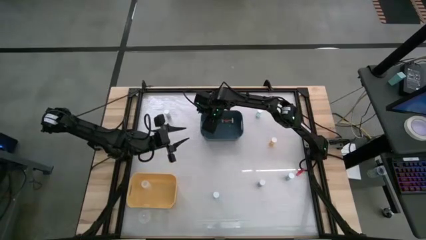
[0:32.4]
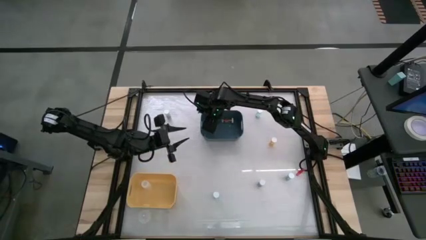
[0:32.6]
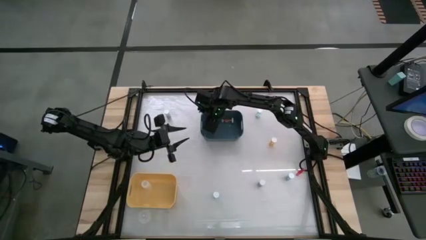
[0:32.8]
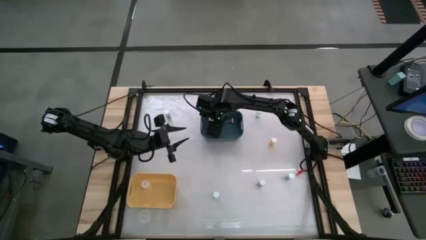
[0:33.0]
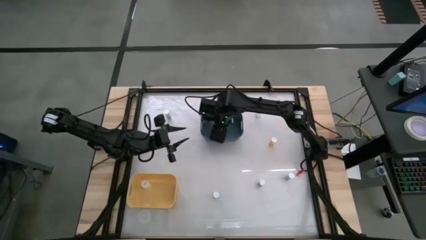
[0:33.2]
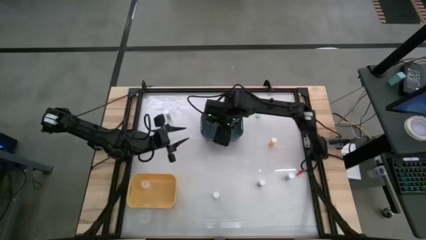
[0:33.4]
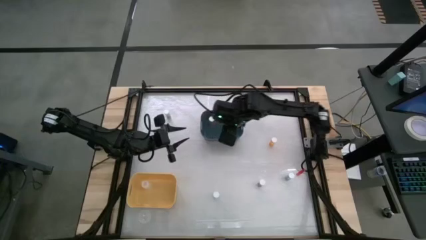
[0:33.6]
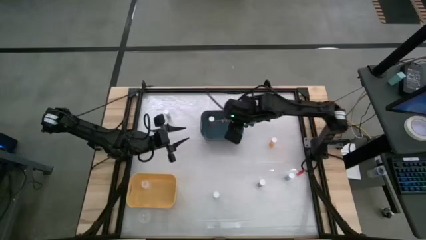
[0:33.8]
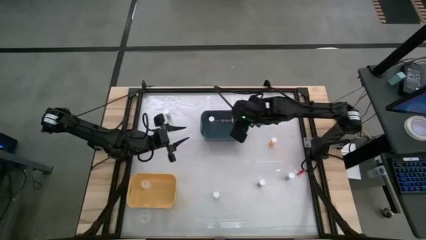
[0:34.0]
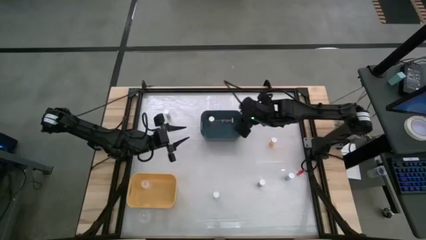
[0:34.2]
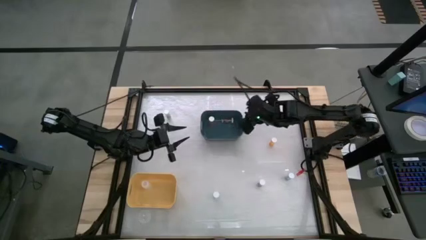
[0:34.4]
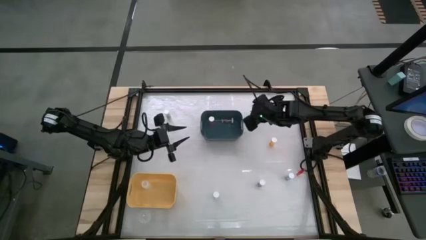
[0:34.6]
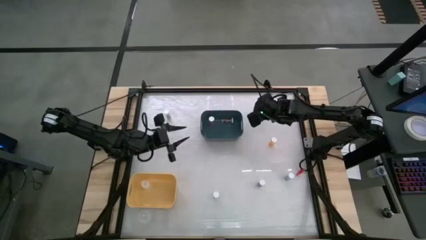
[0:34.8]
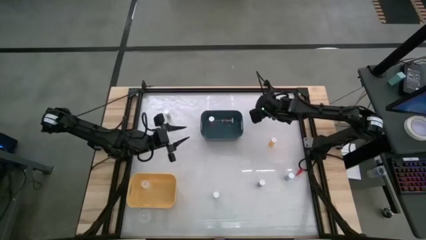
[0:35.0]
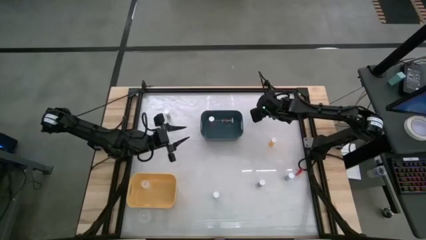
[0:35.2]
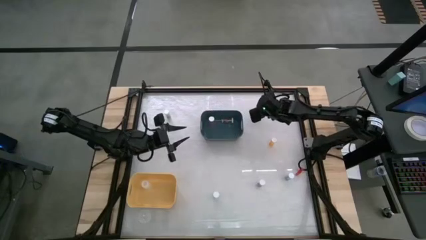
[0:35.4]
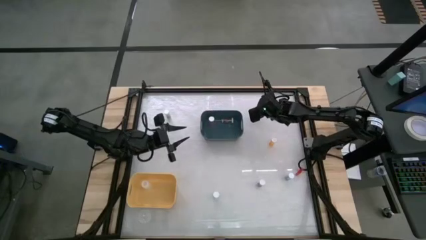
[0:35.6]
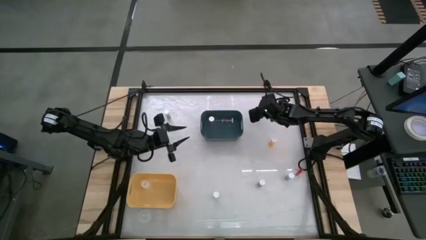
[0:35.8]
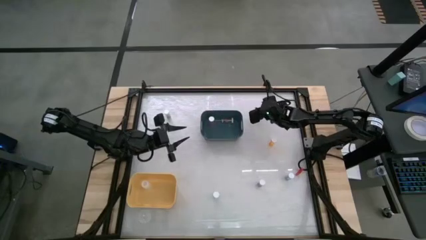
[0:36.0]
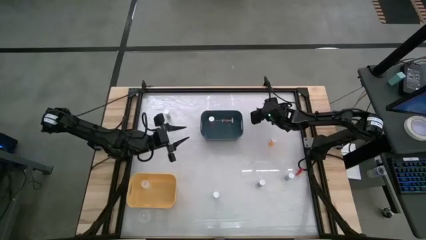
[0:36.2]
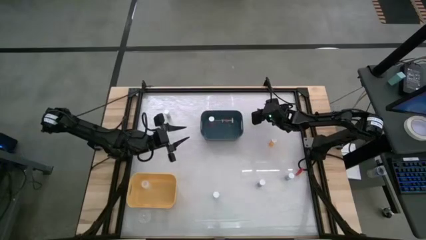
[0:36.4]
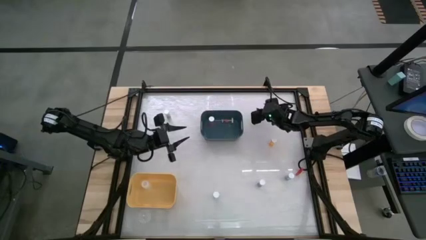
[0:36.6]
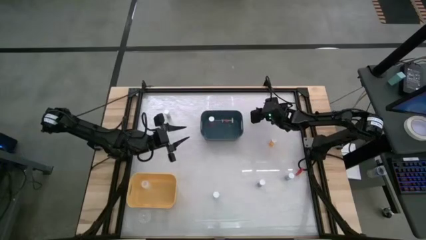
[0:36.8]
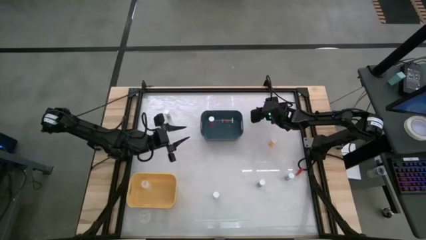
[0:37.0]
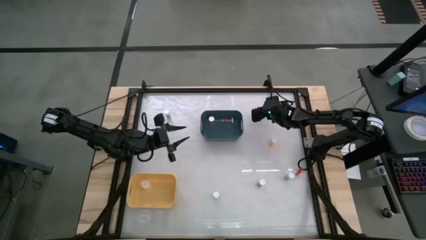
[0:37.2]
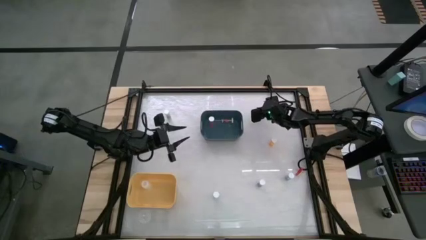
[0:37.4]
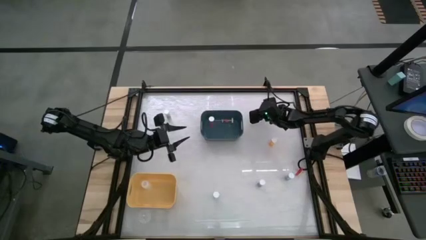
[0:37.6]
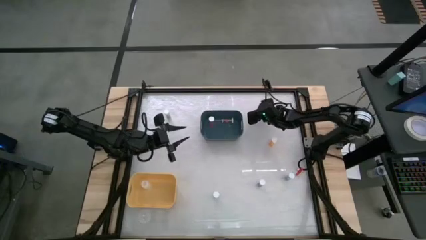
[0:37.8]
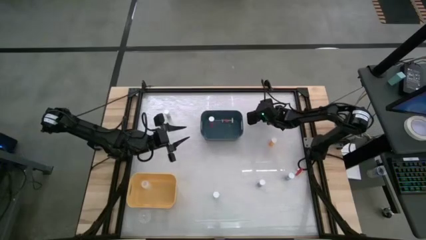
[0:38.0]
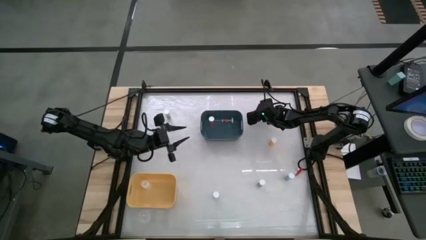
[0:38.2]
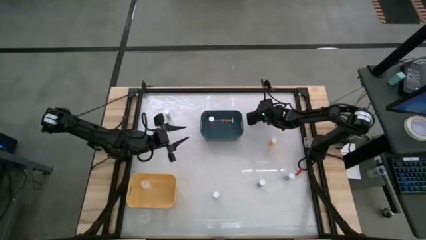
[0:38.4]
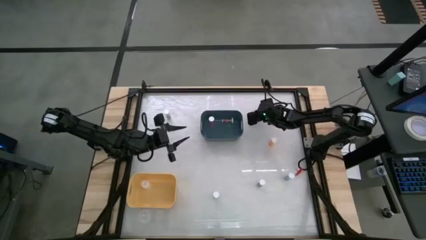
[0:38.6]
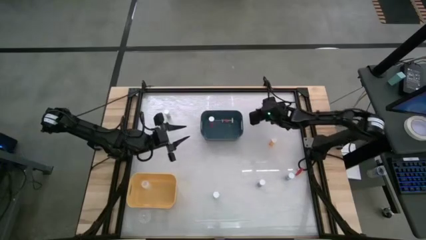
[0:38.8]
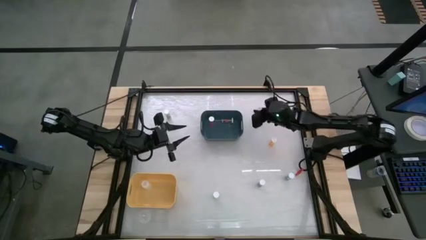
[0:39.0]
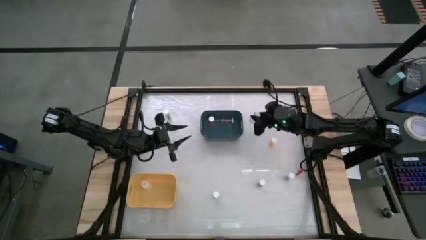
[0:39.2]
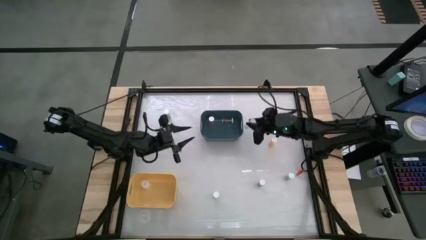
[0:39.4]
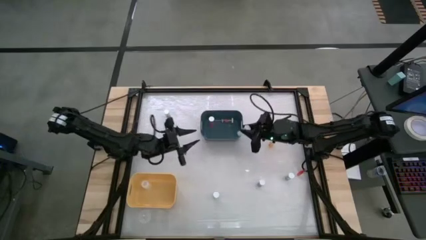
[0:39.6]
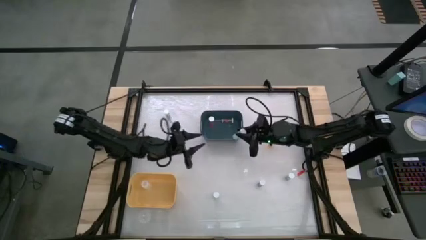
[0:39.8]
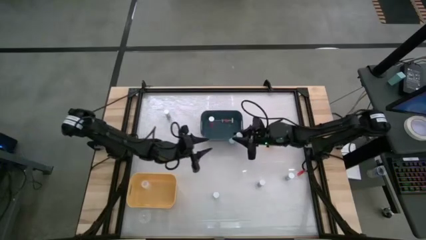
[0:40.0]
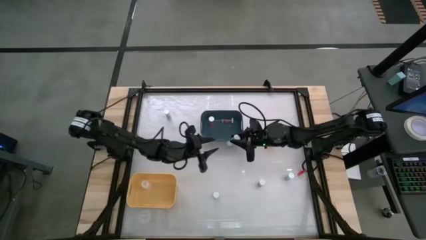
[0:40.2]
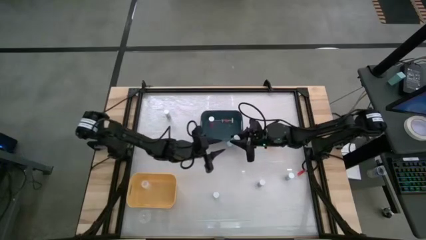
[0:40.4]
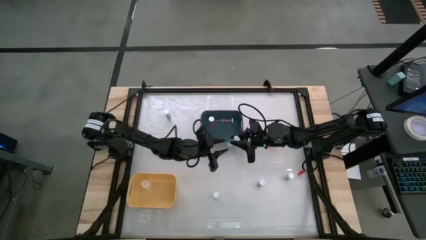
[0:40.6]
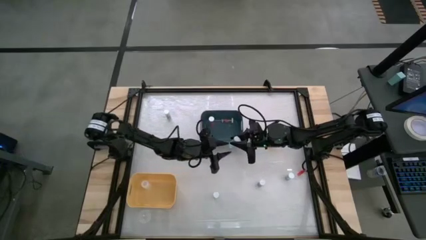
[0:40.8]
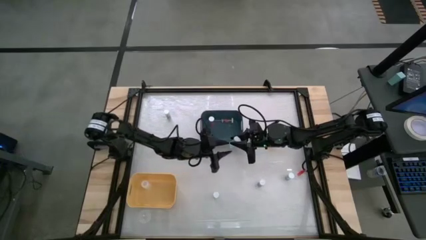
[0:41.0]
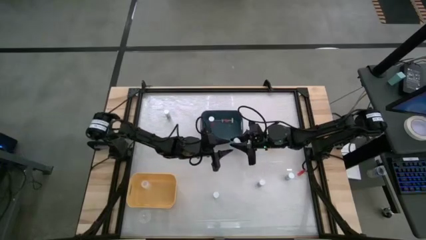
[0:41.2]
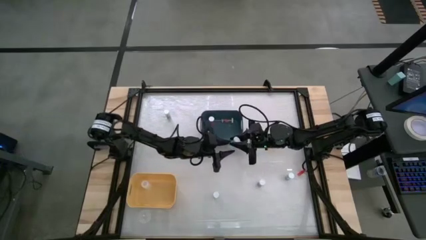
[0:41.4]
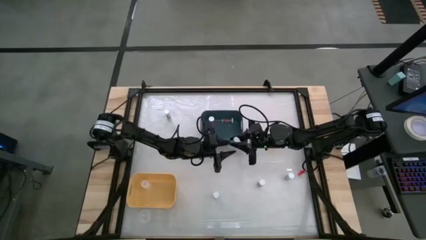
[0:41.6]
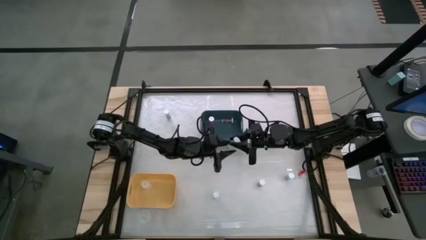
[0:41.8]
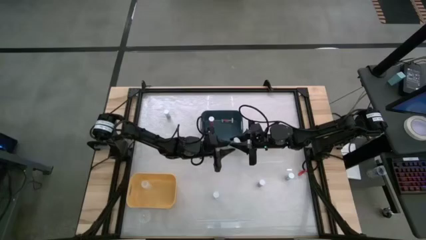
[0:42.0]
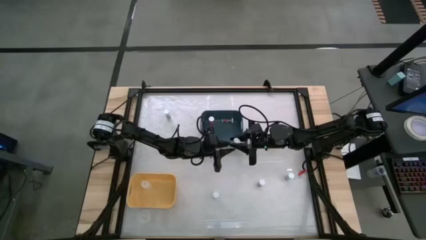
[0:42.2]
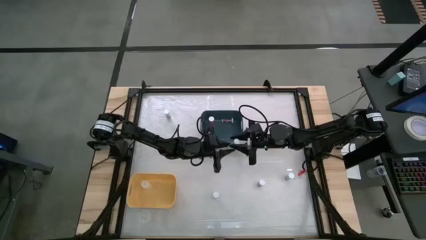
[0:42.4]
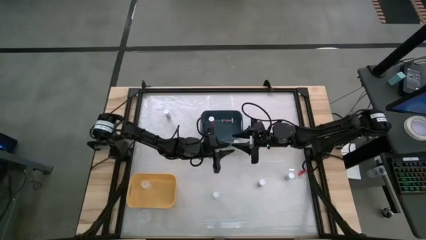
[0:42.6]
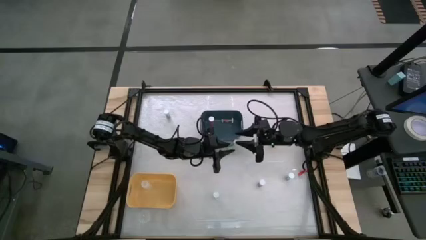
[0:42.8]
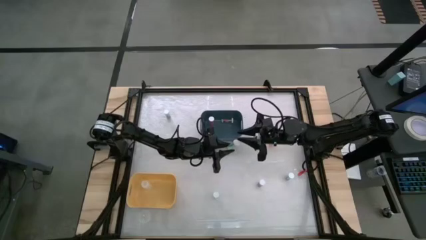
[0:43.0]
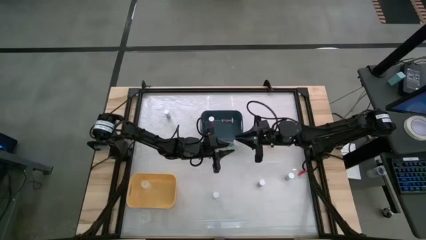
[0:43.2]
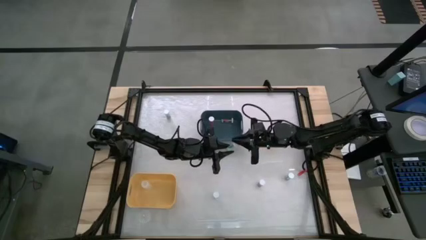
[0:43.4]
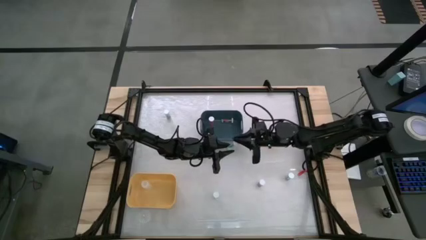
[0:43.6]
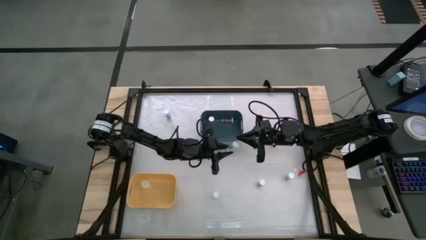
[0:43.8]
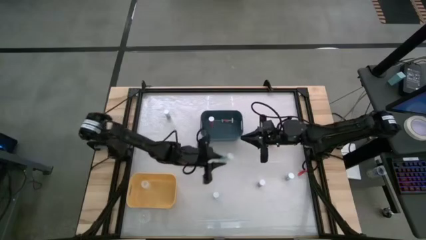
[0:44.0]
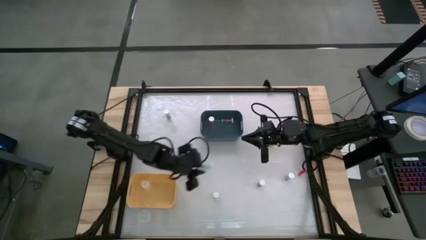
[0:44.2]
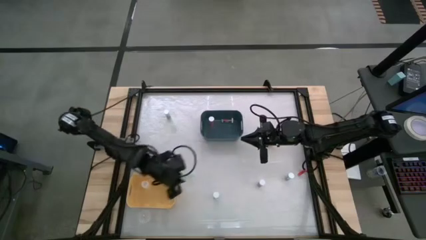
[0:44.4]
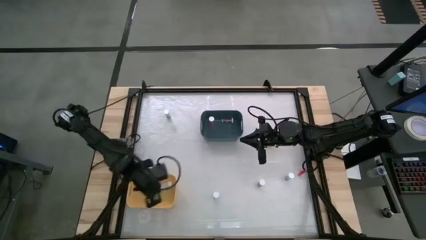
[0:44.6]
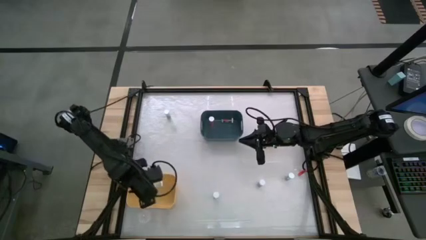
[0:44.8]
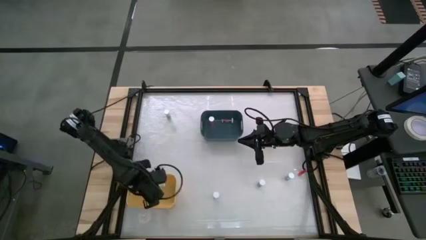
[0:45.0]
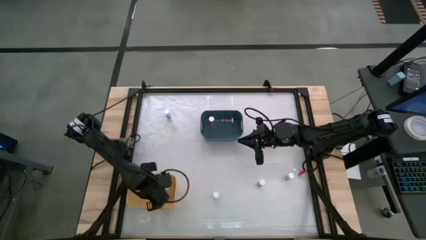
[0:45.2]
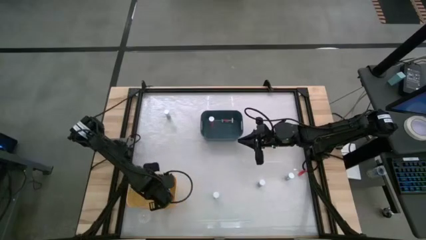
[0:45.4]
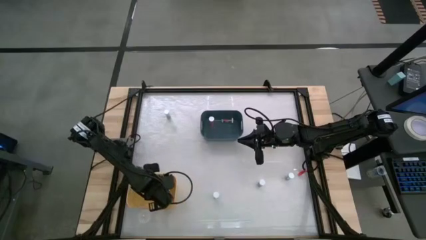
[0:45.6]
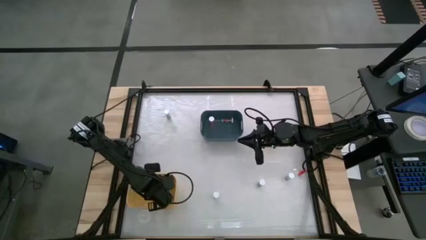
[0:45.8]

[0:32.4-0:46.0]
Task: Pick and place medicine bottles into bin by pill shape (circle, oval)
Put the green tablet bottle into the yellow bin

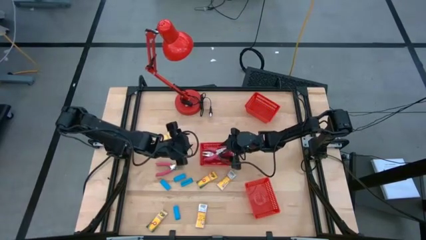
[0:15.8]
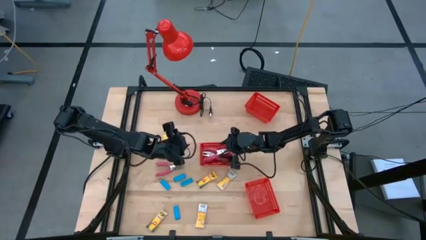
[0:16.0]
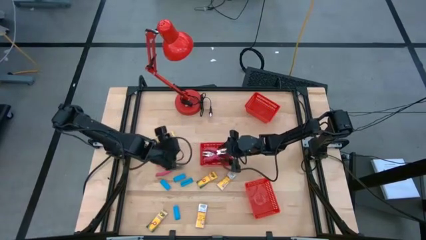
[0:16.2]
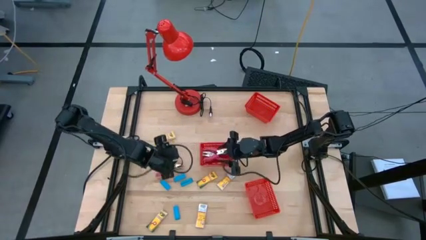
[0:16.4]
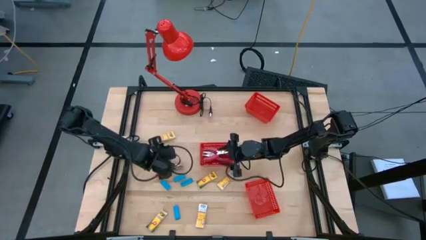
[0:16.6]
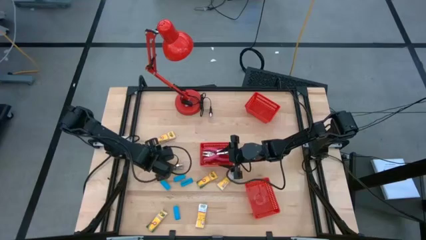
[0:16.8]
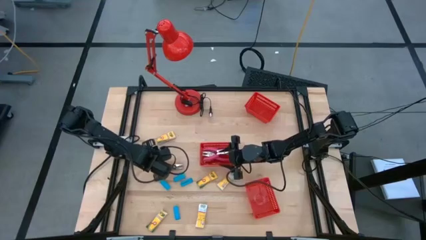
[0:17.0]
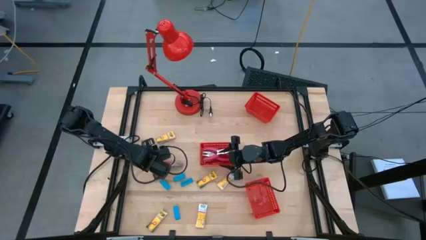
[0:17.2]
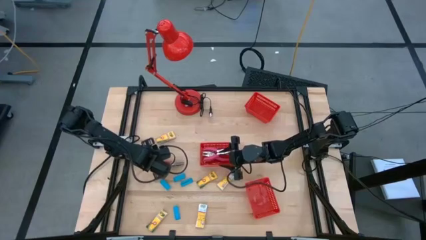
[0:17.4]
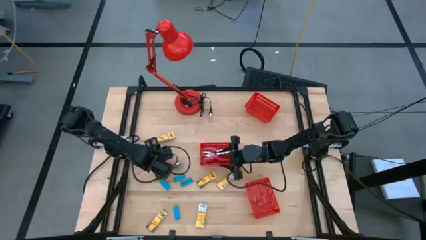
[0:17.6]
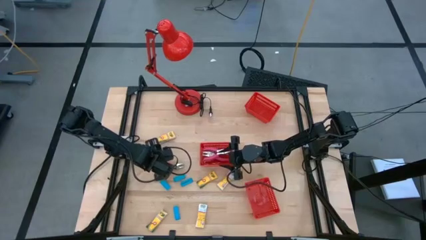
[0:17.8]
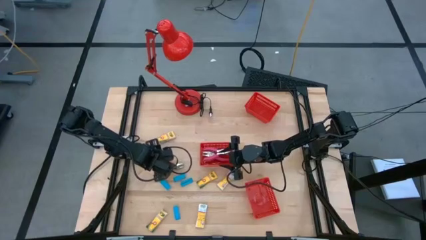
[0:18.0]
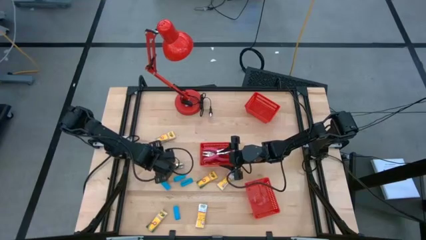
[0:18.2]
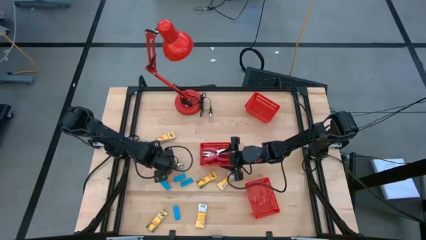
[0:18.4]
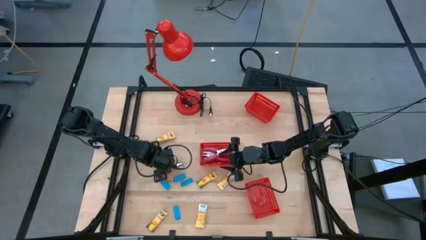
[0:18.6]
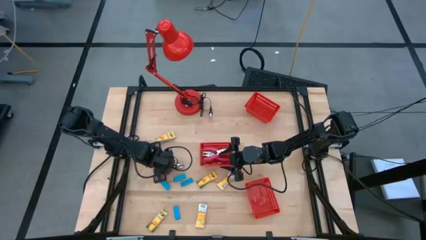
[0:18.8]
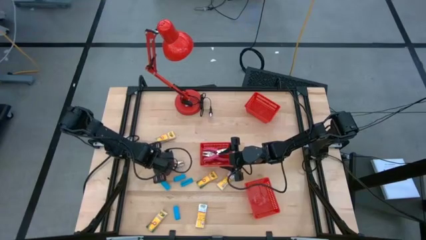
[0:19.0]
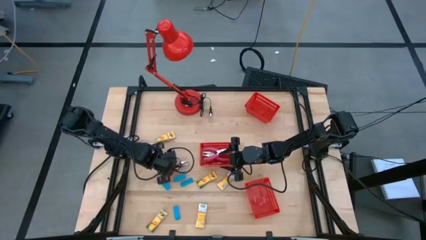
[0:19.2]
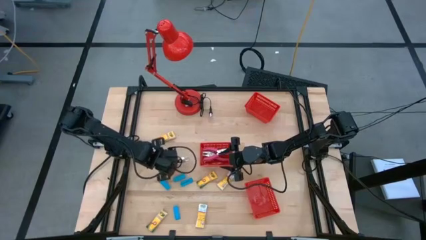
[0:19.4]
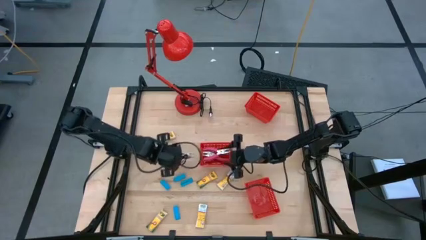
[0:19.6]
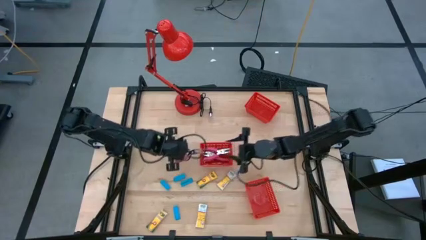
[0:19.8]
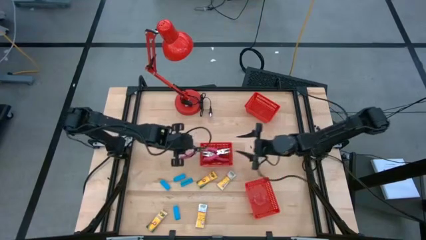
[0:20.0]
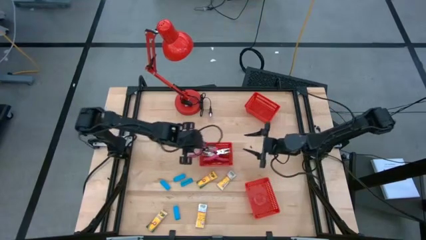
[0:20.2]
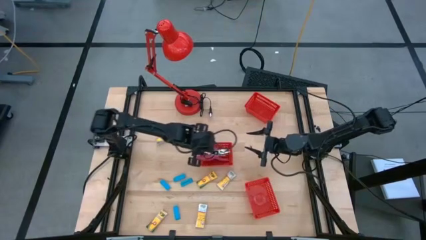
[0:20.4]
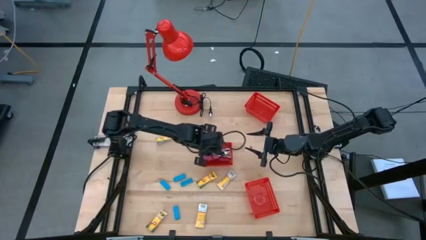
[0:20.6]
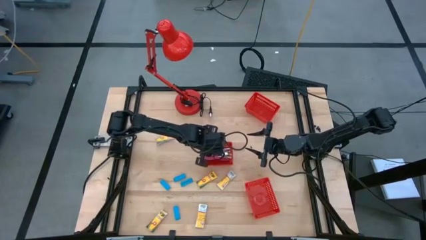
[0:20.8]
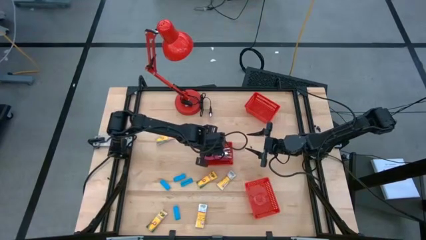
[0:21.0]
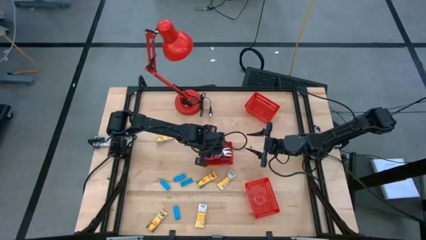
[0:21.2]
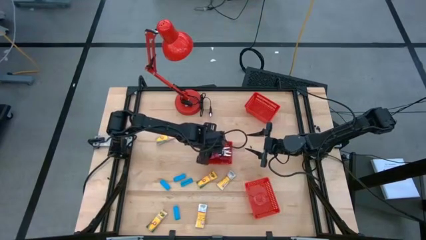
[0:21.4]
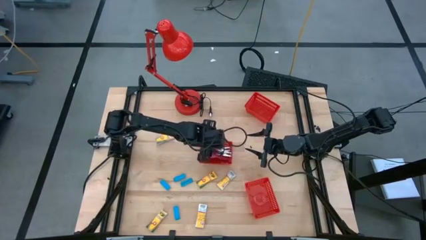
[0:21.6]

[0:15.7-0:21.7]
Task: Pick & Place School Supplies
Put the pink hole puncher into the middle red bin
